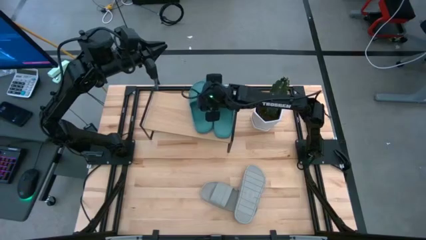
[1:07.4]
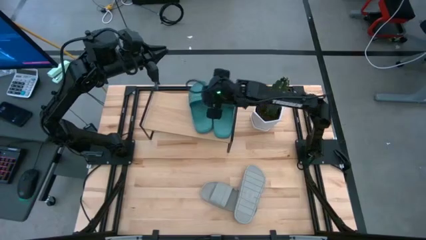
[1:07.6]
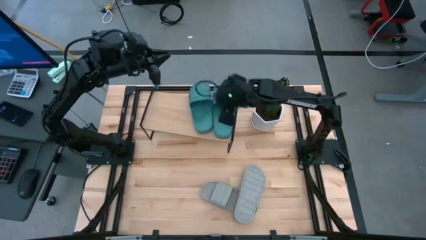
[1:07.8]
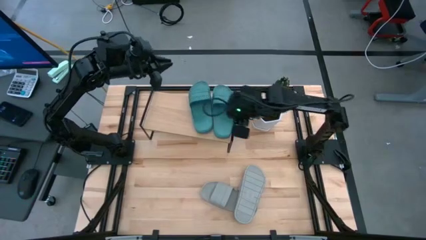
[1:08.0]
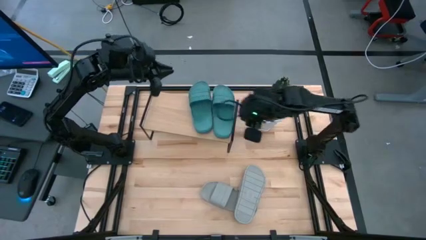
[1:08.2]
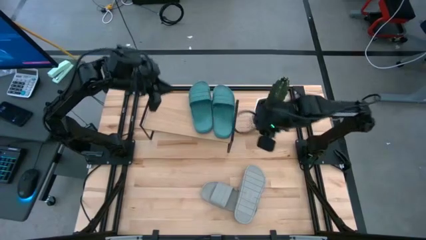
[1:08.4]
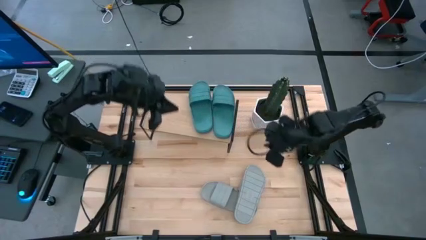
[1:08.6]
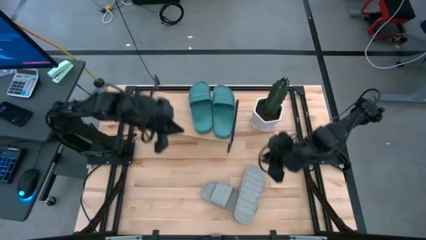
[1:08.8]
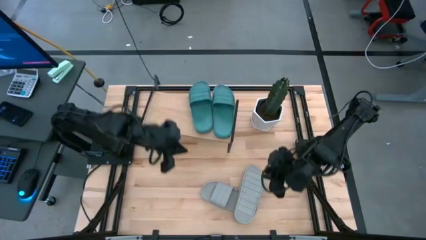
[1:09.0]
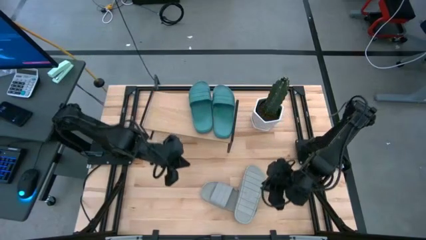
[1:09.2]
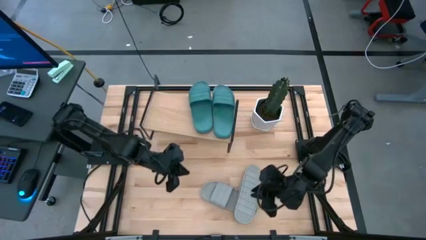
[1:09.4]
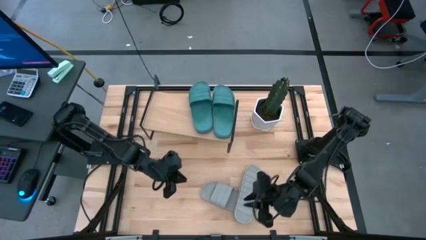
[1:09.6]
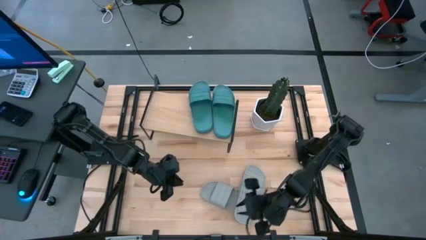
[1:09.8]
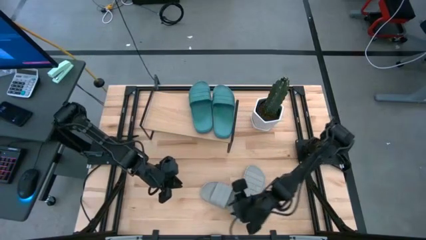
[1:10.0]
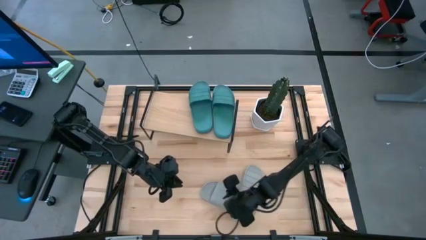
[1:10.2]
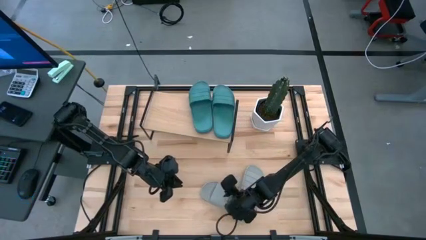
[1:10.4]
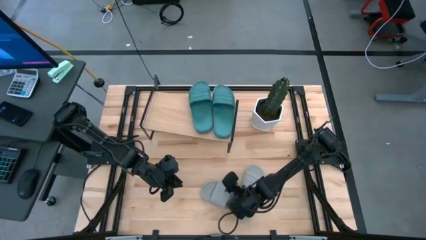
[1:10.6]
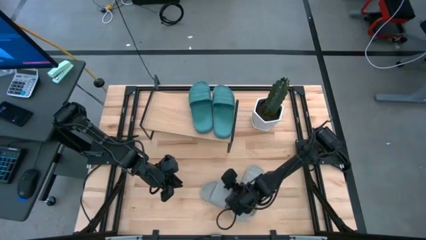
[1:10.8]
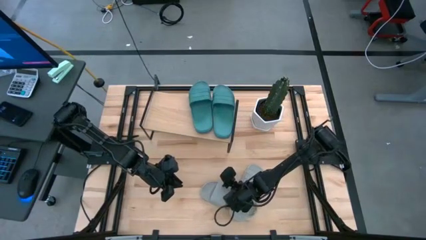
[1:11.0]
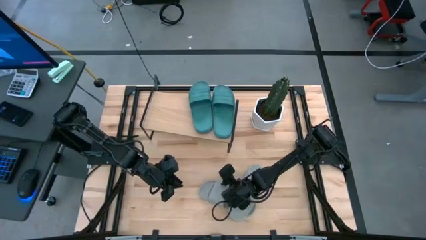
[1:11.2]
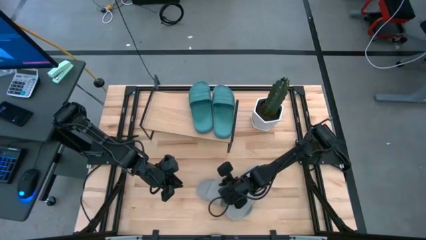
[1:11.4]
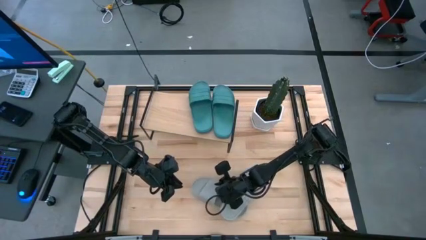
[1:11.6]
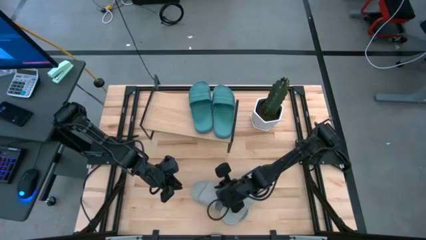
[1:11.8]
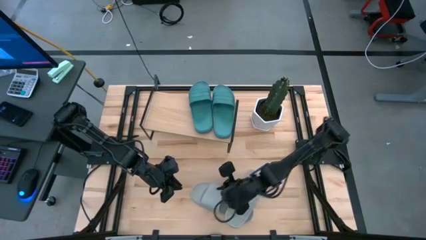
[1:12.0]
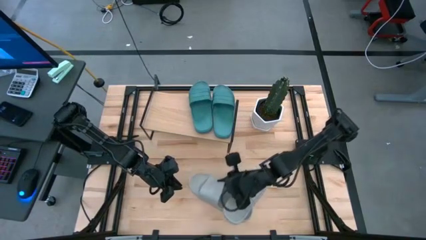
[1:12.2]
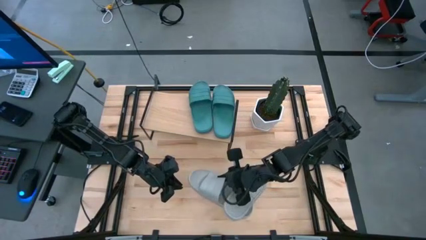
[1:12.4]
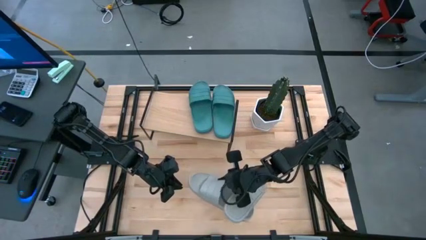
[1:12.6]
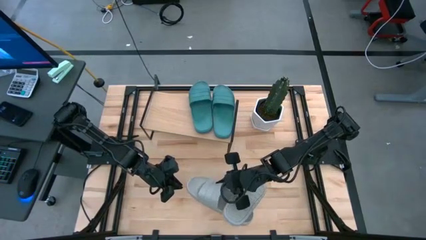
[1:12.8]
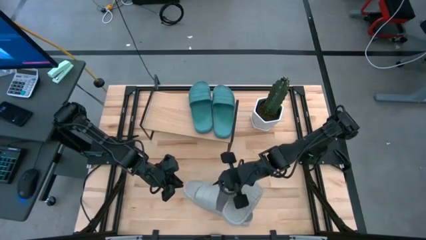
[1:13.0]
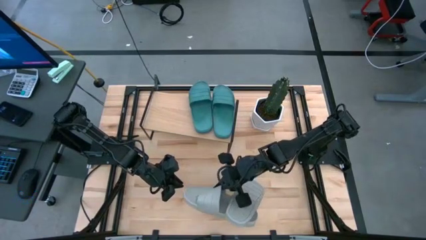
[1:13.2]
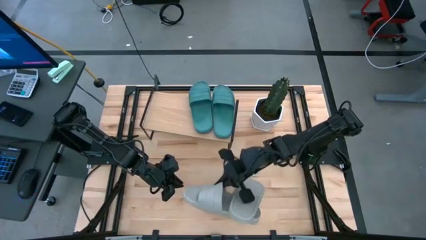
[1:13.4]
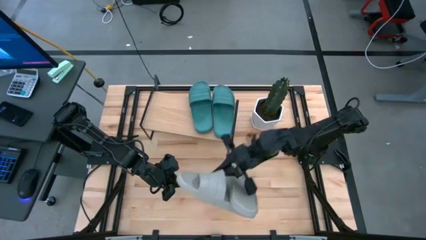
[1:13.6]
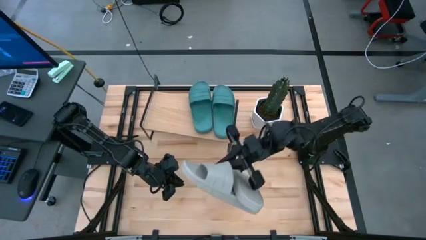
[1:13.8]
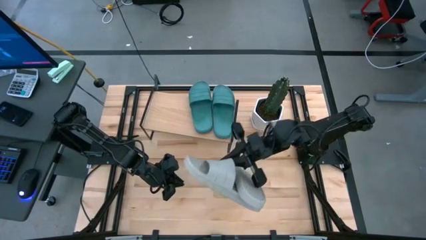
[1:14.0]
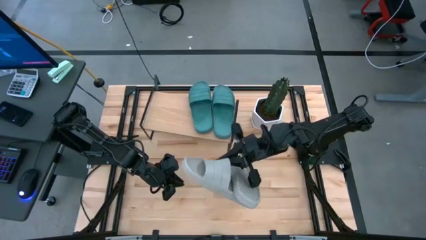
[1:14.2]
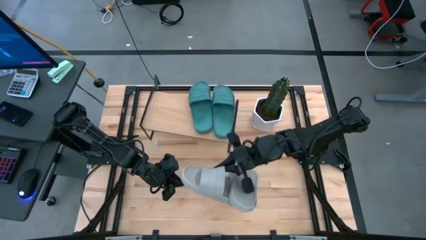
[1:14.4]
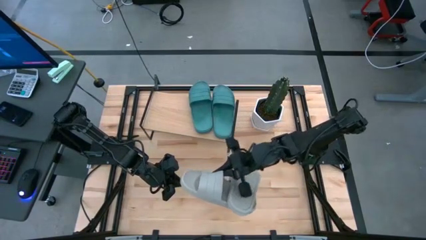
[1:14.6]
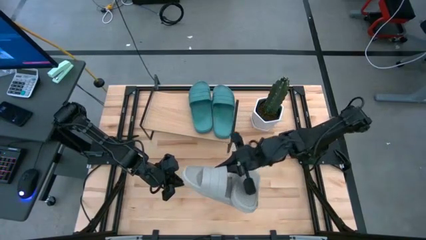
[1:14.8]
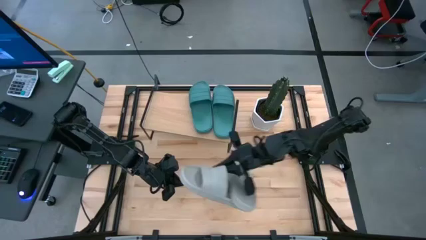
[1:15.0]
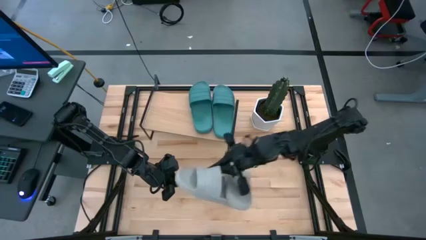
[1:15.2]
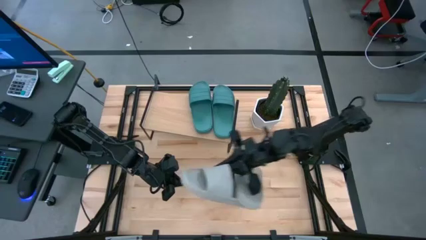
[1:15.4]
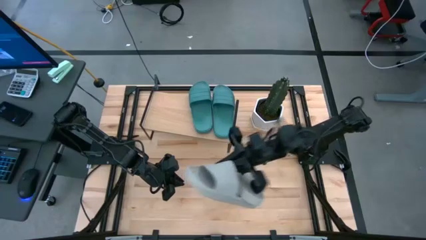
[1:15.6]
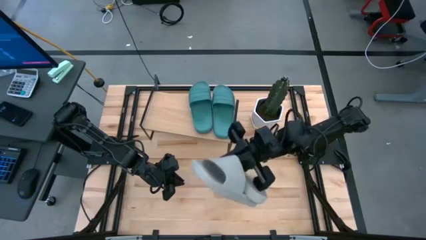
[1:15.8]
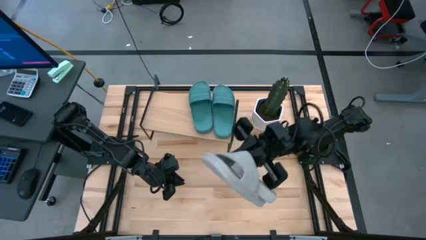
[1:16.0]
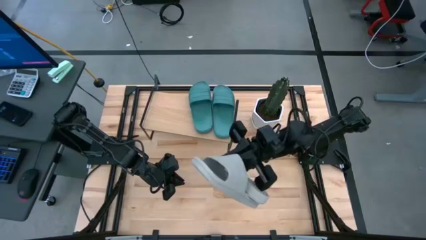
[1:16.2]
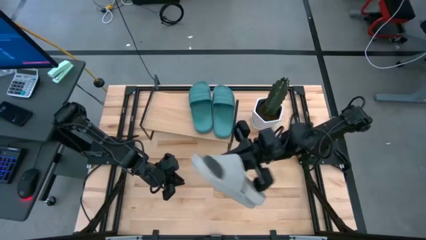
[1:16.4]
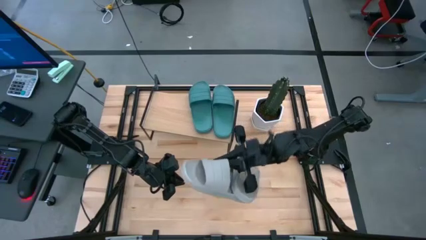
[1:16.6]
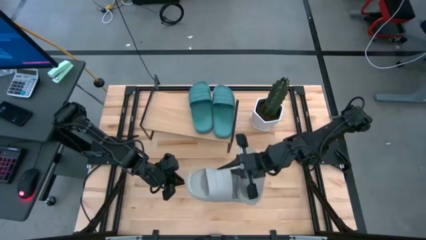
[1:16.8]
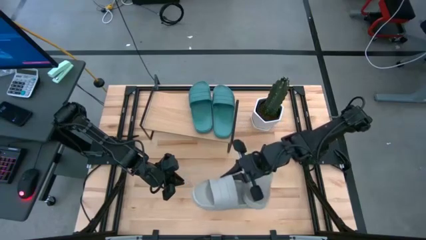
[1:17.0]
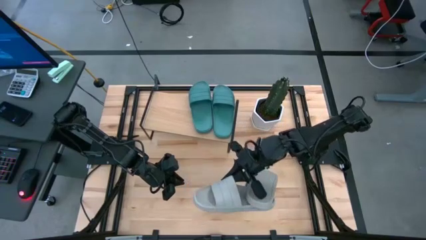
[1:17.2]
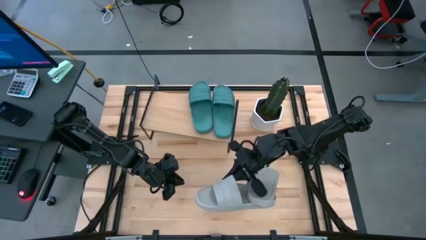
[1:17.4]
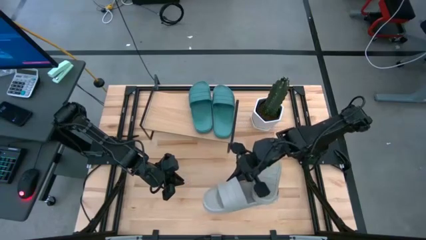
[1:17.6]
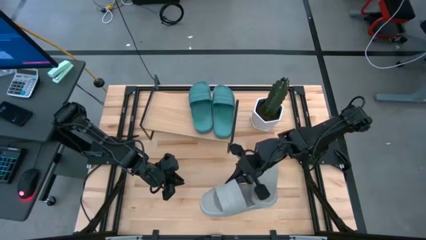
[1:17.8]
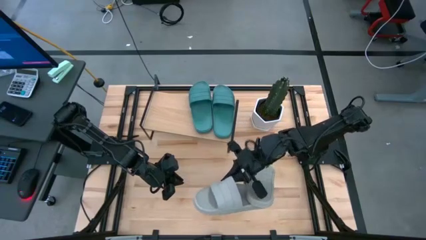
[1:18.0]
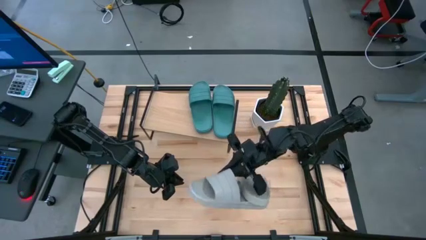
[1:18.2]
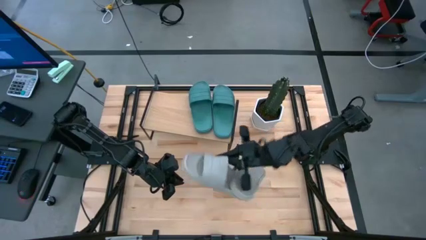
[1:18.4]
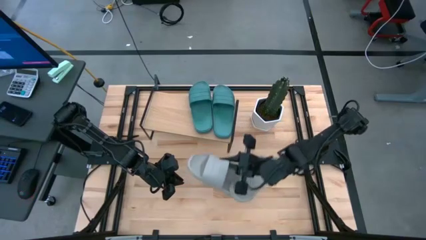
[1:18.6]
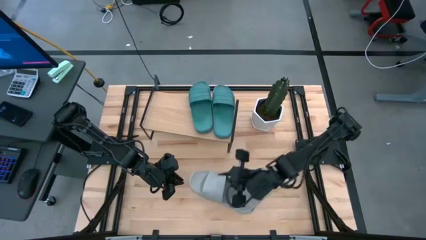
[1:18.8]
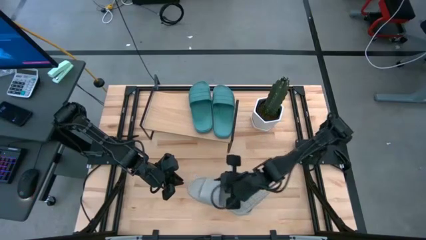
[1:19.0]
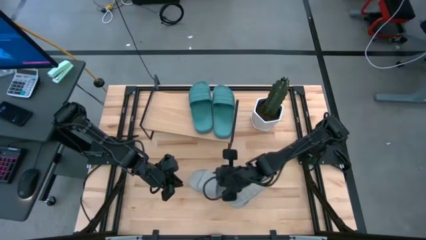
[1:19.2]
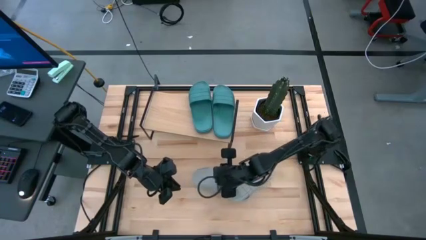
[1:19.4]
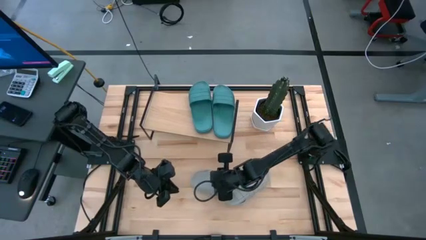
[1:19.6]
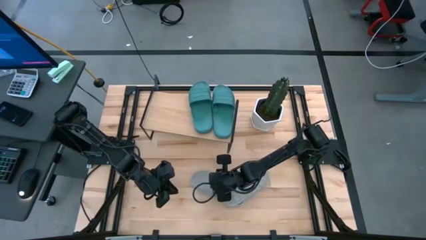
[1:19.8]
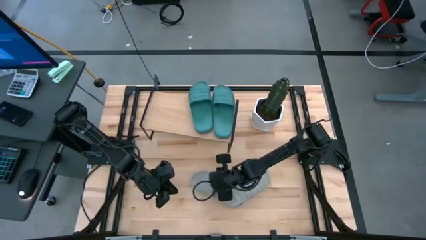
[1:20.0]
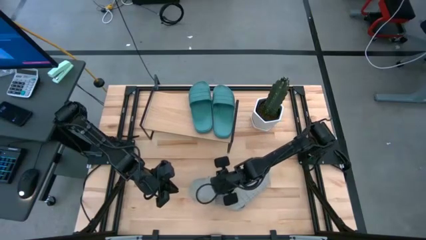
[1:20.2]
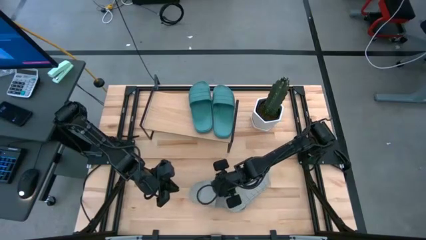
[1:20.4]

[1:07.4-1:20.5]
Task: Pick and place slides into the shelf
Put the left gray slide on the shelf

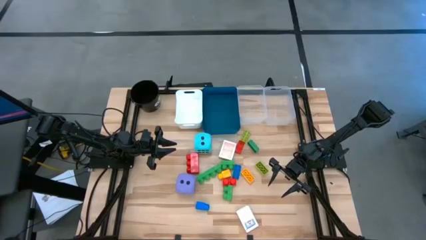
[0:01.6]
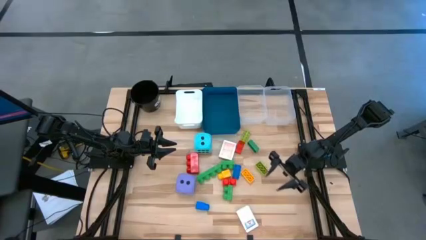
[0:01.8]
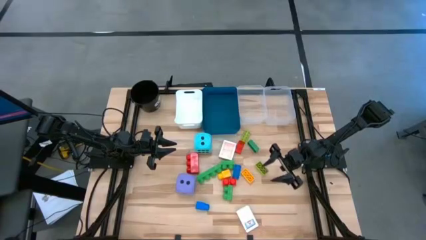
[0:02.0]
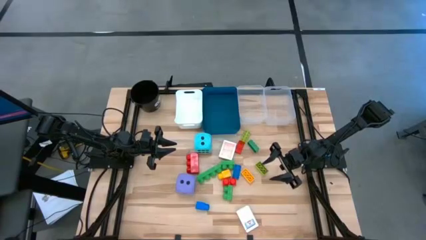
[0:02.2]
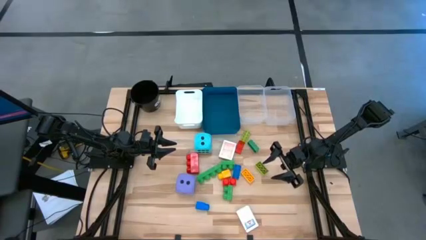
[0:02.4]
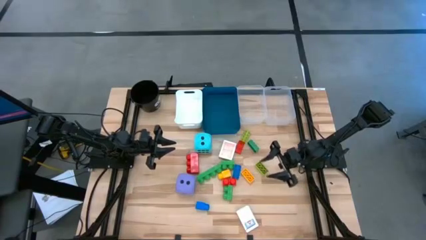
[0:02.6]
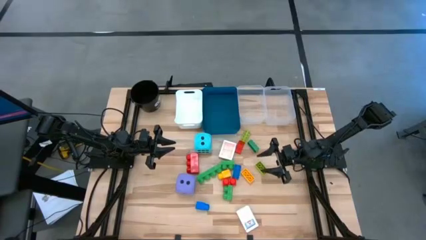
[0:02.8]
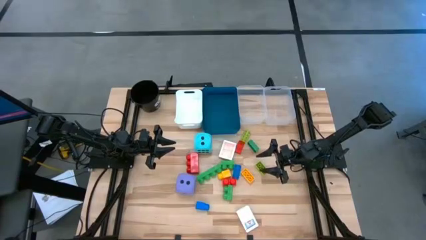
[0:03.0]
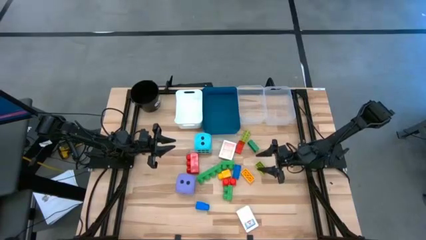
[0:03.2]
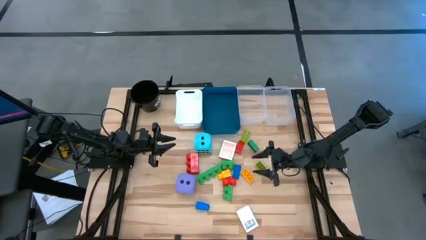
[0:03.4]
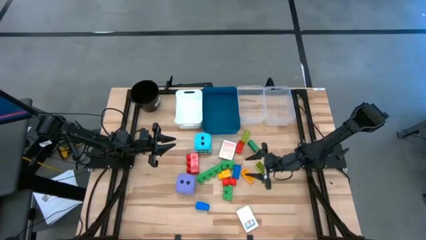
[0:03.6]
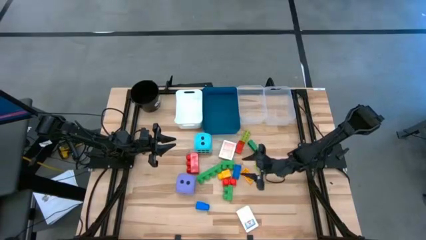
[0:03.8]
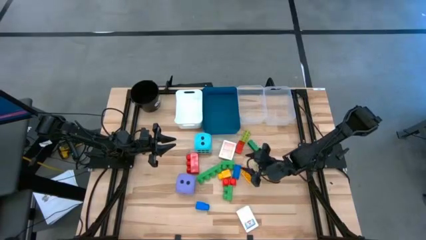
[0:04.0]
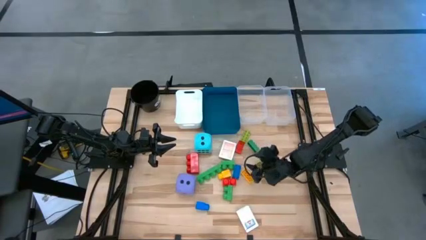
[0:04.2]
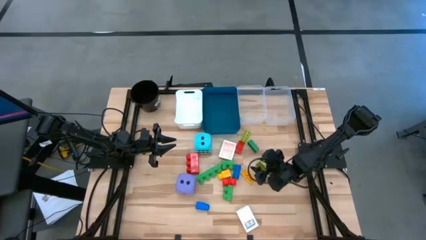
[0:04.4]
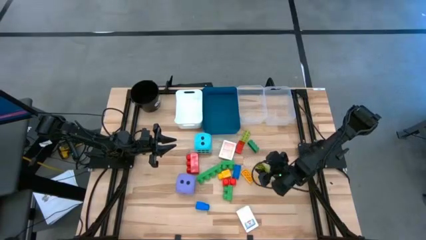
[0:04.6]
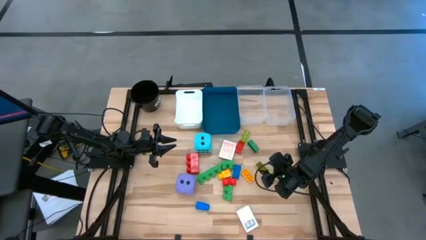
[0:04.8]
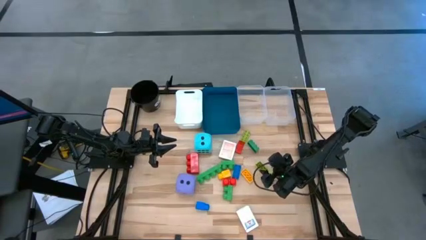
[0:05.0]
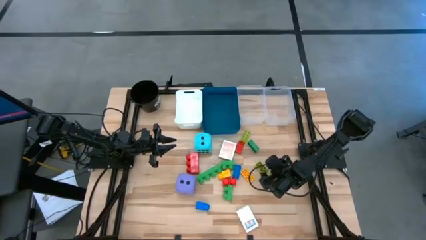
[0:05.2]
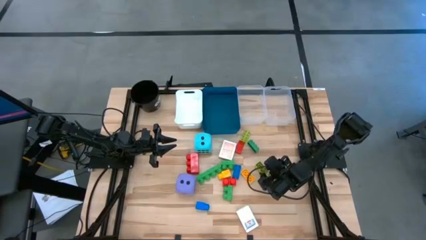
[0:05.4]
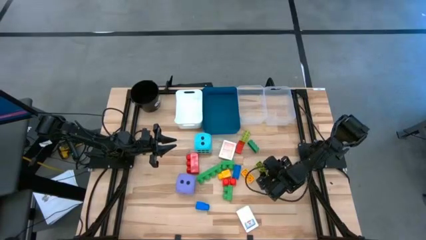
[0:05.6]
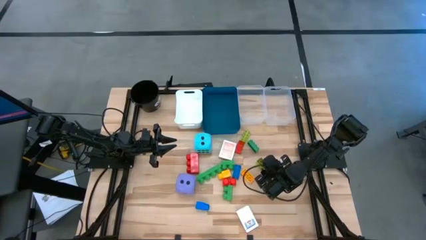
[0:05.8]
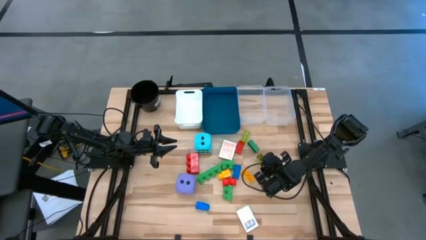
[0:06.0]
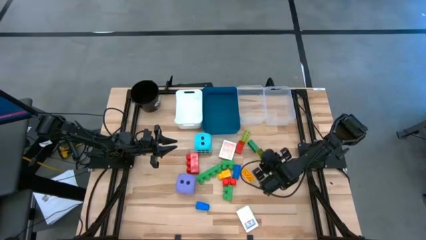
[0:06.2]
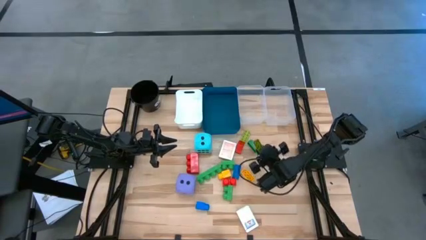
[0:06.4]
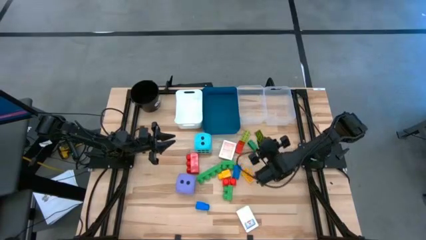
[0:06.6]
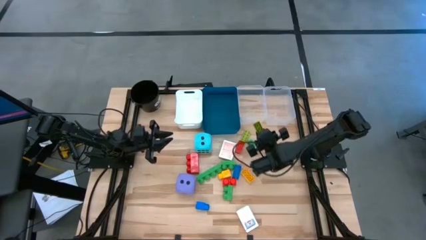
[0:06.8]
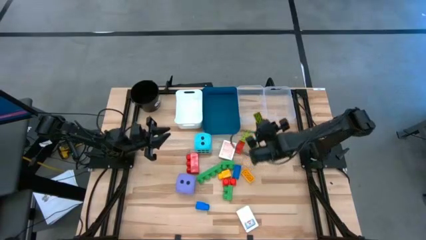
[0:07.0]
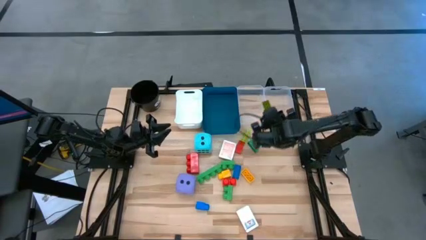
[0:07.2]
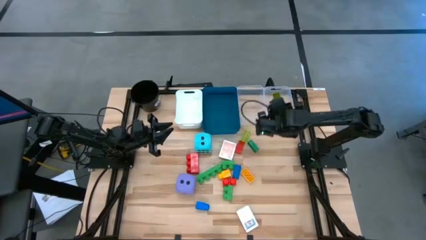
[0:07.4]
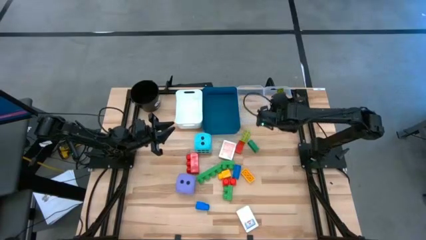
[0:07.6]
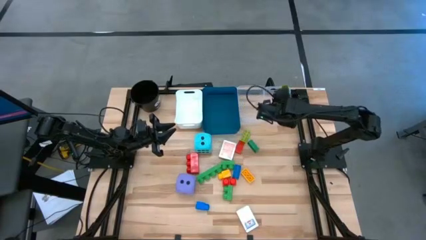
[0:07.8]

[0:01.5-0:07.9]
Task: Pick & Place Toys
Put the bottom small light green game piece into the right transparent bin
